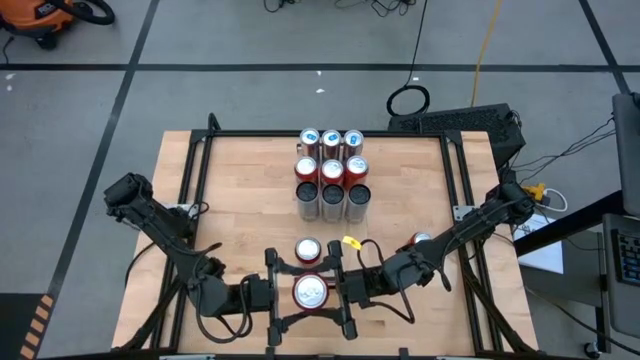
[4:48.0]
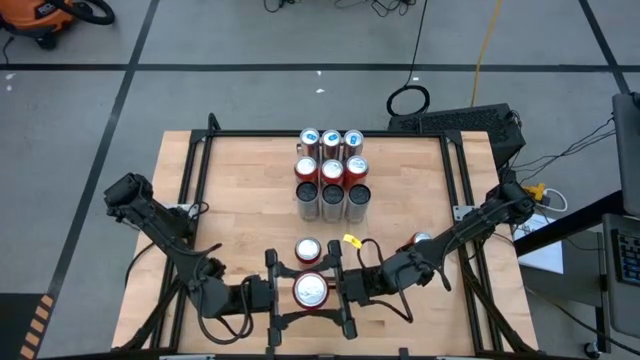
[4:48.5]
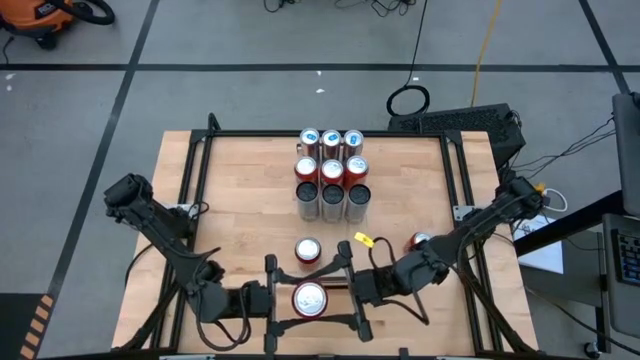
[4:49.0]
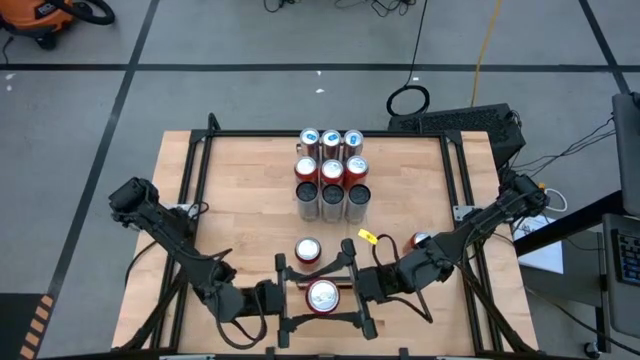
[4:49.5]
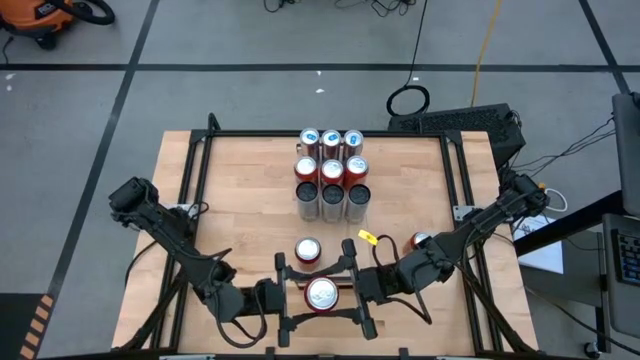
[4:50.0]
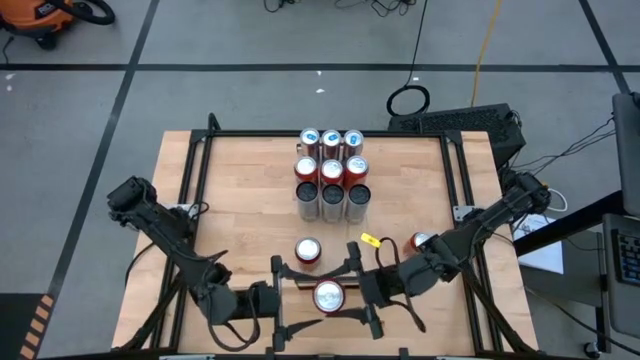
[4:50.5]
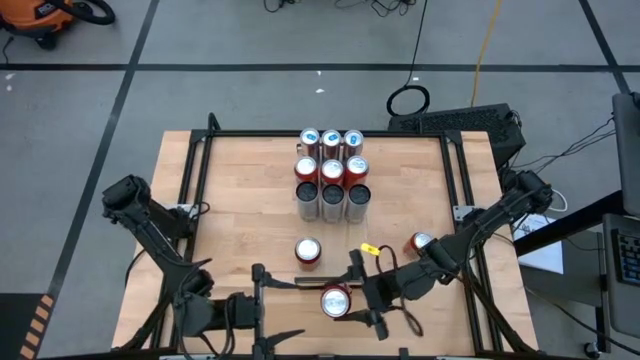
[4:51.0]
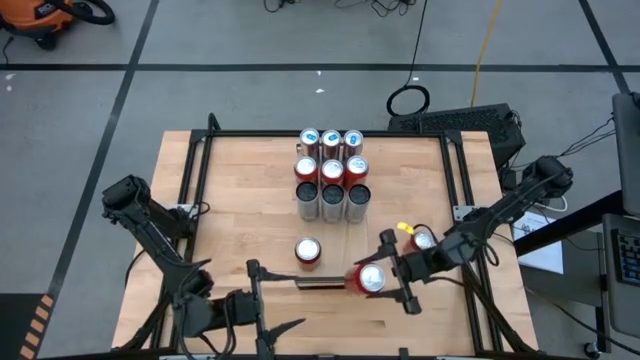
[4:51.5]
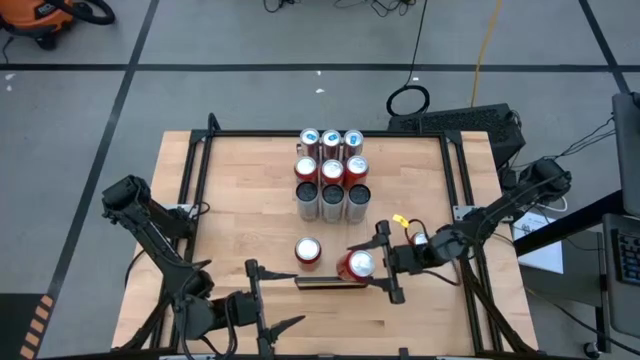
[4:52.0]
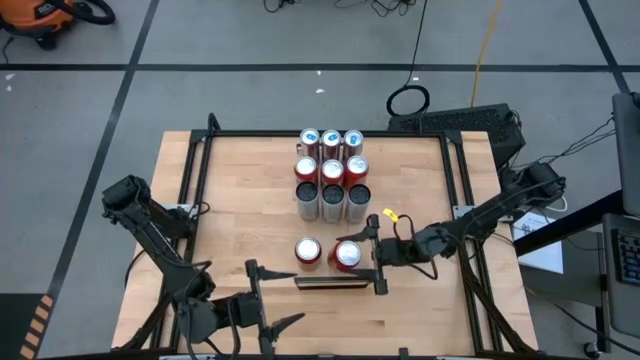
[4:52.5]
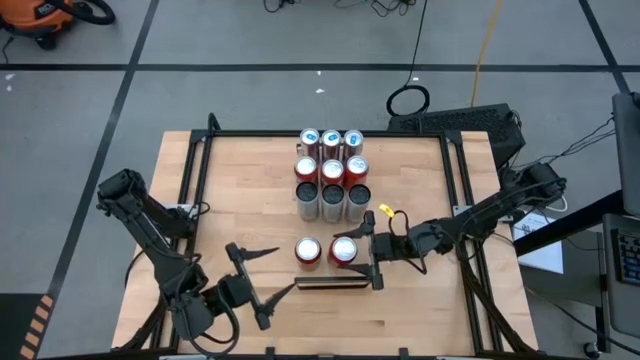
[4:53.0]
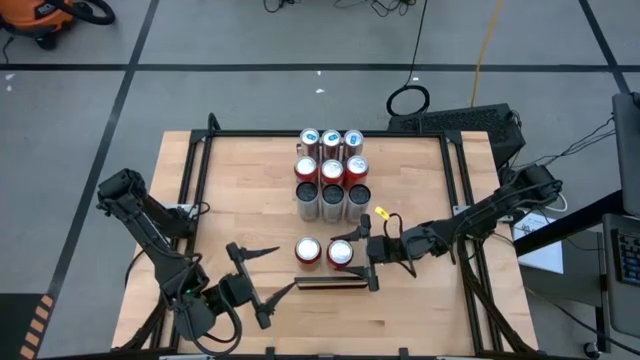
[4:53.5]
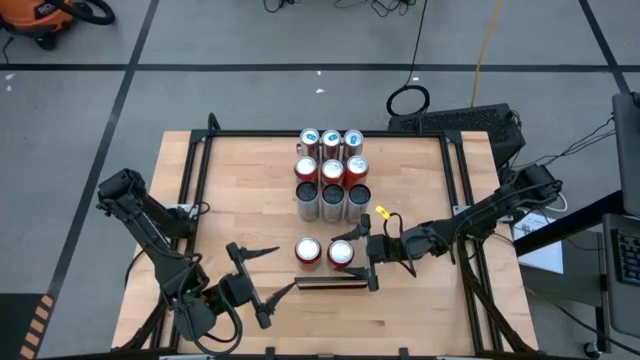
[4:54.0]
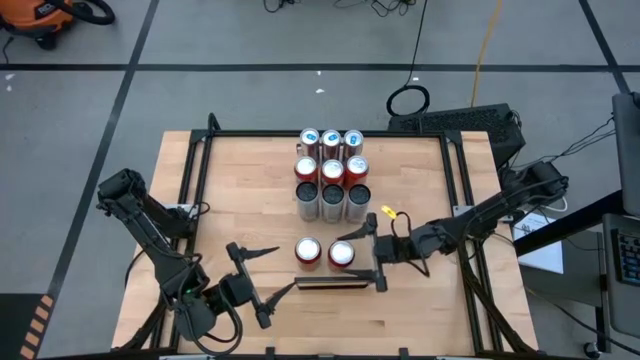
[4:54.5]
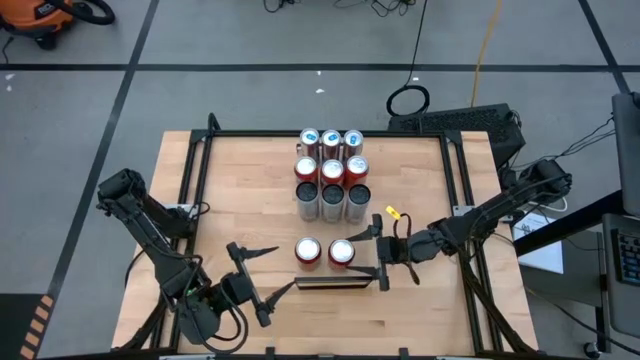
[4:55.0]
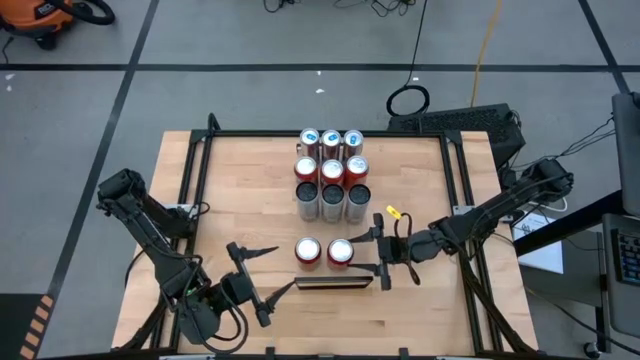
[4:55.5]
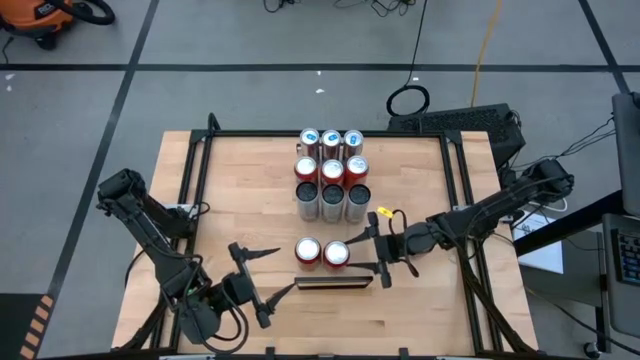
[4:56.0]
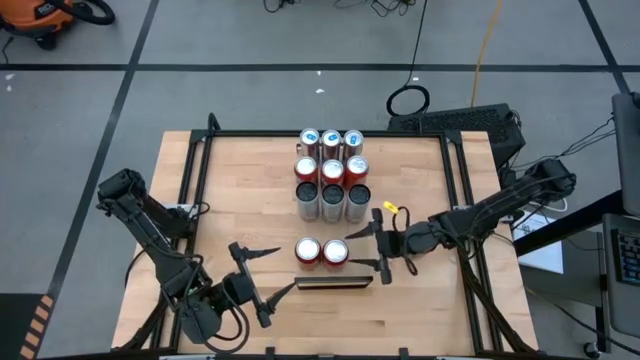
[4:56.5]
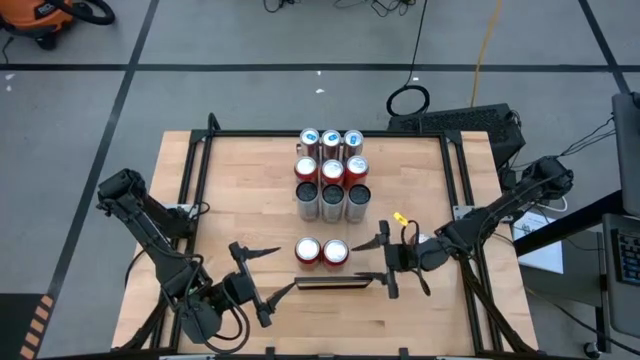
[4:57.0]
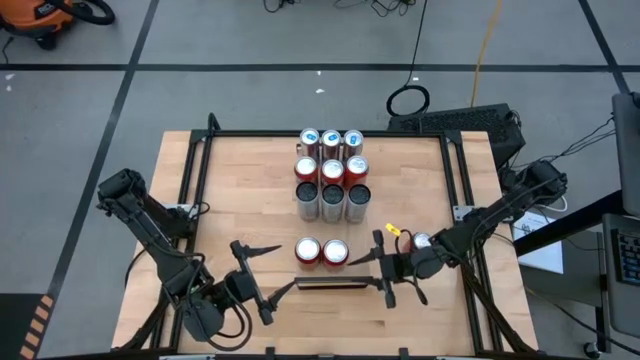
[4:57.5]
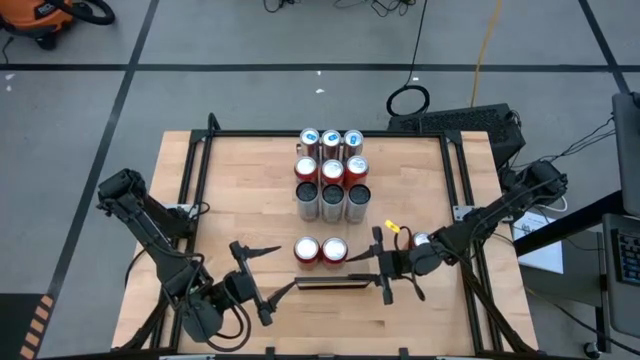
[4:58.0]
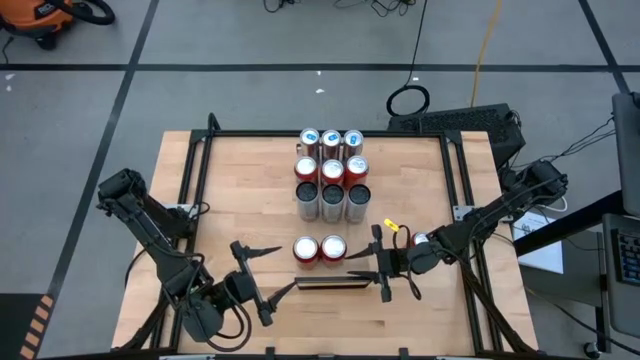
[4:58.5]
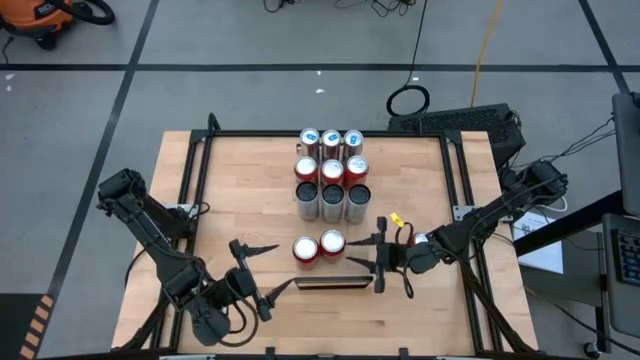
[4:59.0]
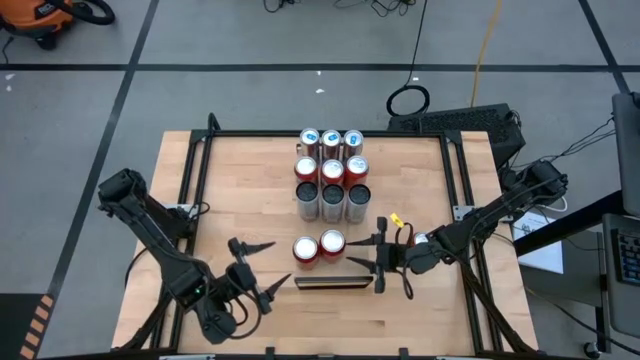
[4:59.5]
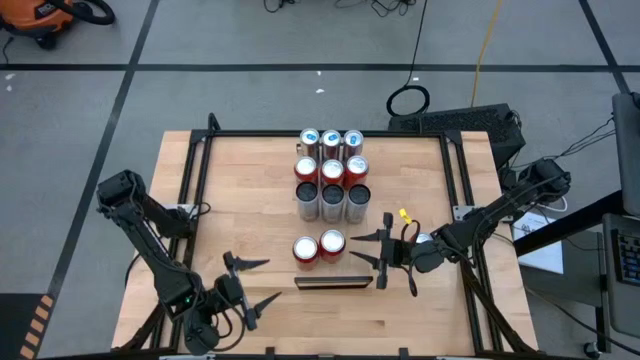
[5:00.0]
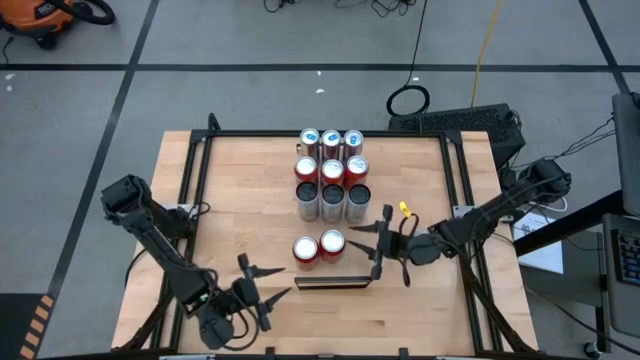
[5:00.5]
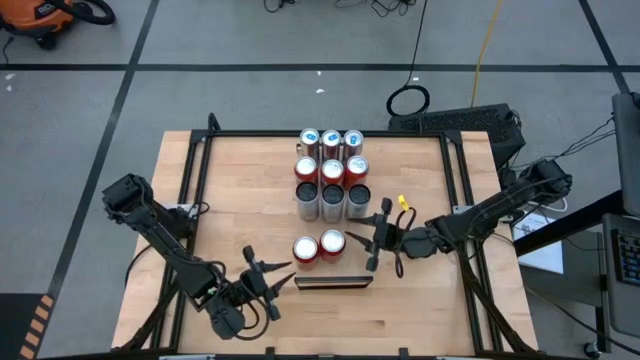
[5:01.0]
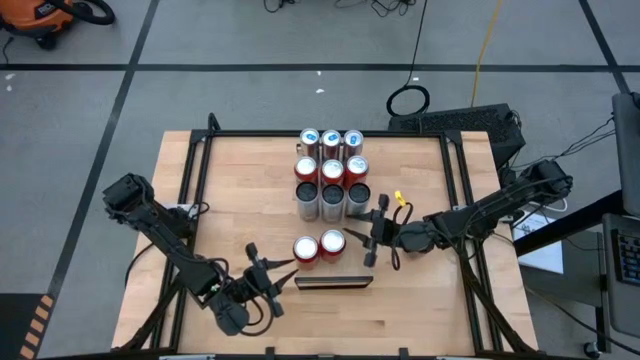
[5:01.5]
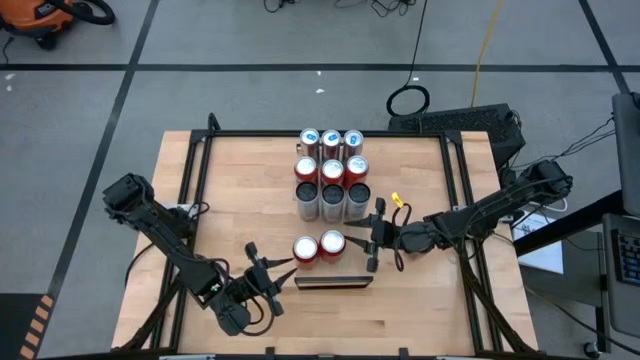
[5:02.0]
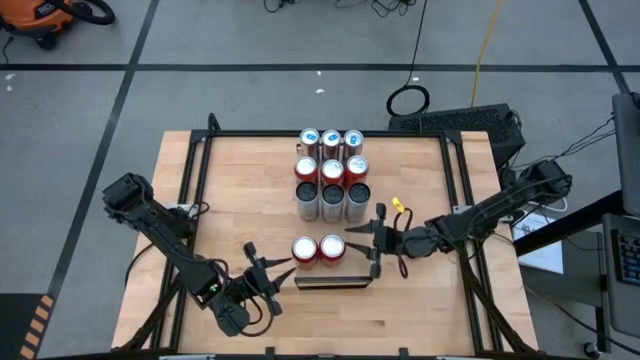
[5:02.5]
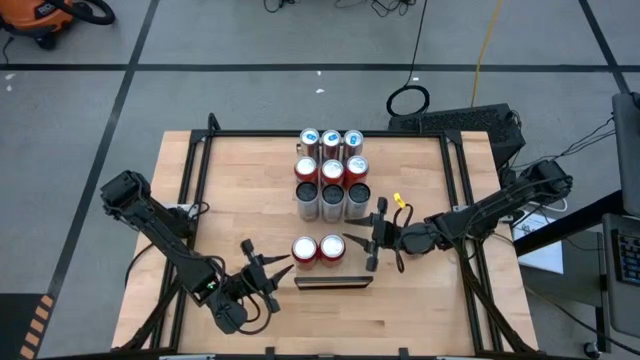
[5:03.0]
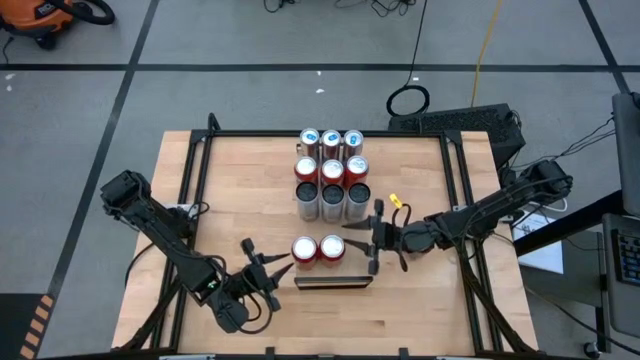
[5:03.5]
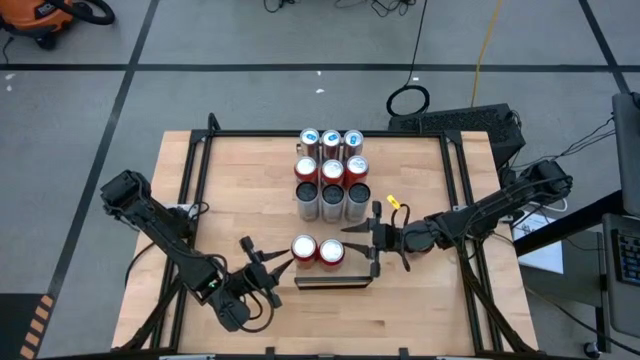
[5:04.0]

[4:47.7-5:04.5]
Task: Place canned beverage on shelf
Put the left red black soda can on the shelf aligned with the other red black soda can

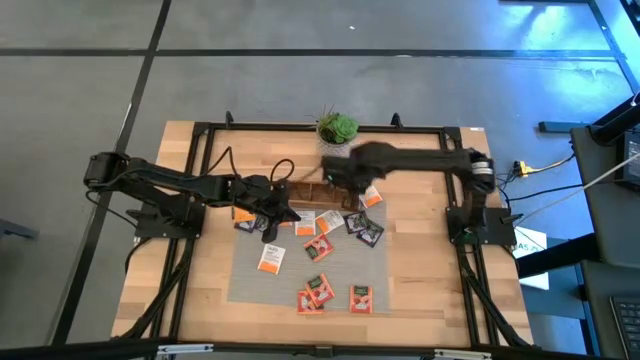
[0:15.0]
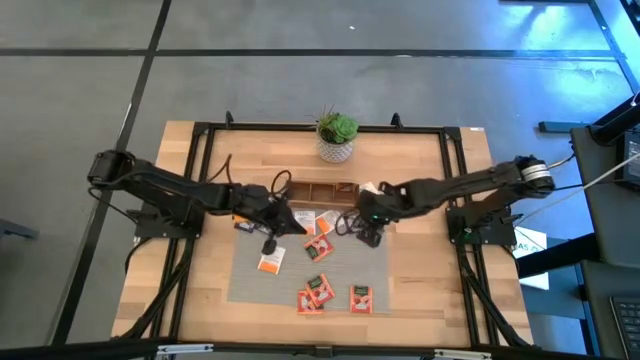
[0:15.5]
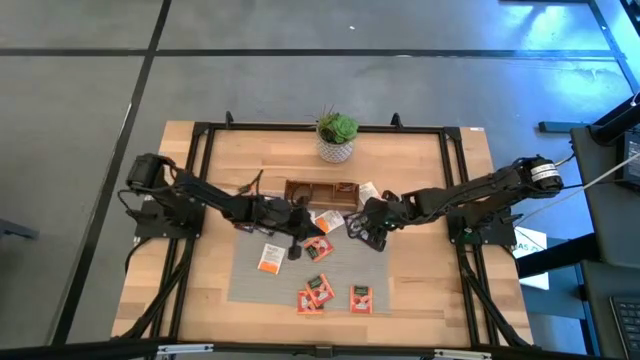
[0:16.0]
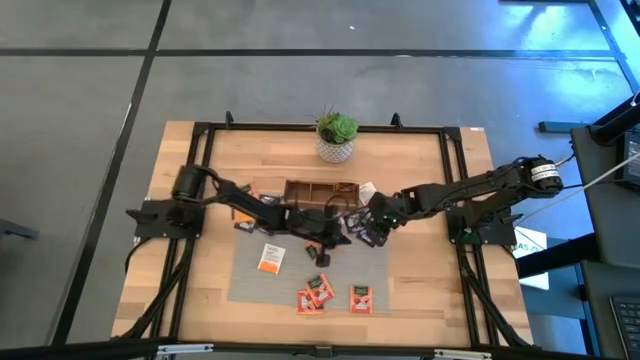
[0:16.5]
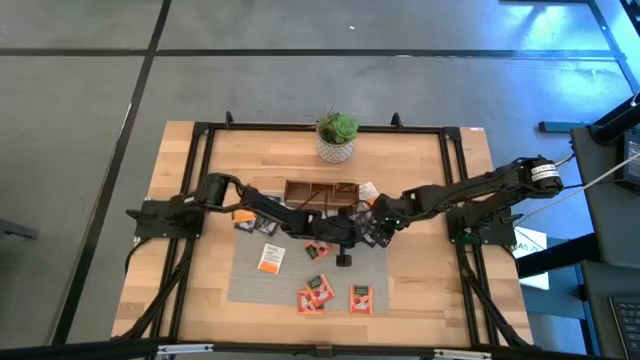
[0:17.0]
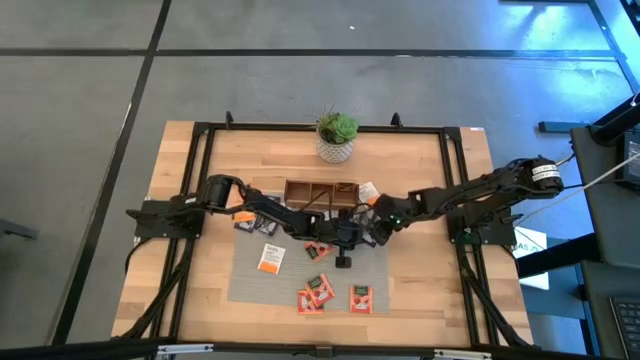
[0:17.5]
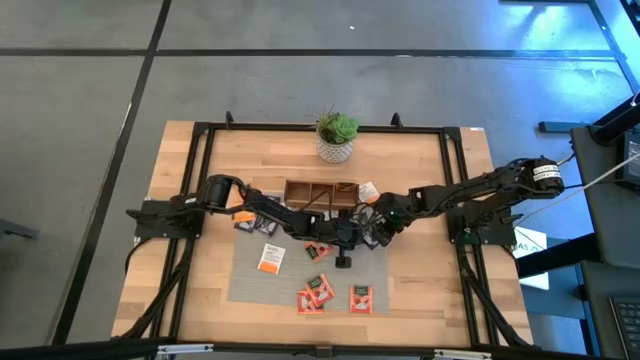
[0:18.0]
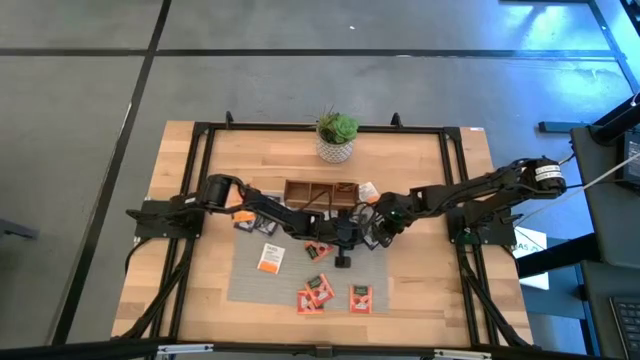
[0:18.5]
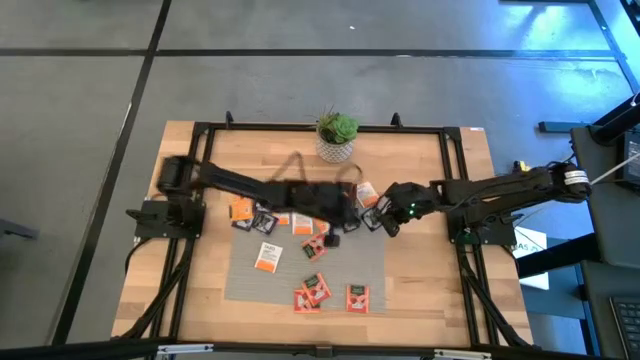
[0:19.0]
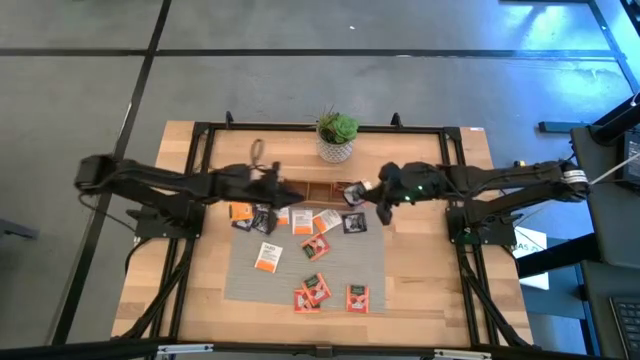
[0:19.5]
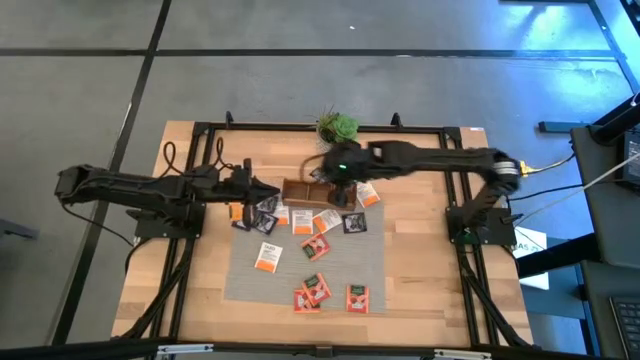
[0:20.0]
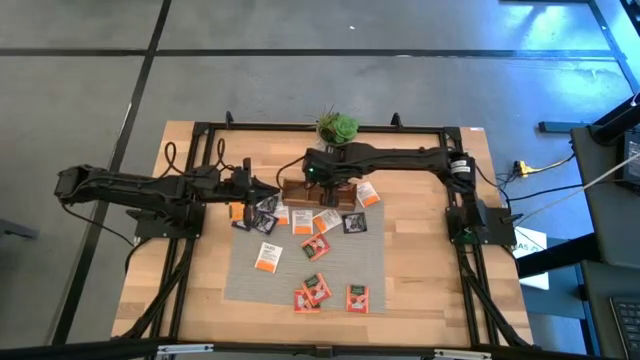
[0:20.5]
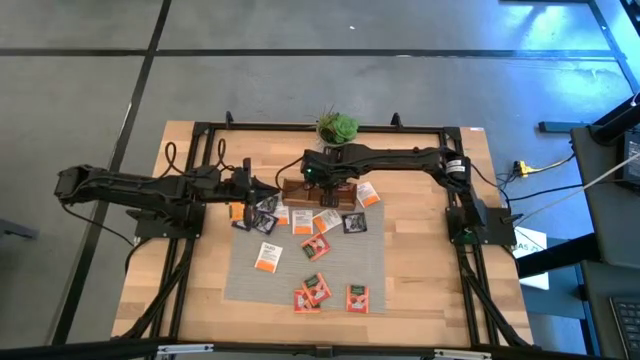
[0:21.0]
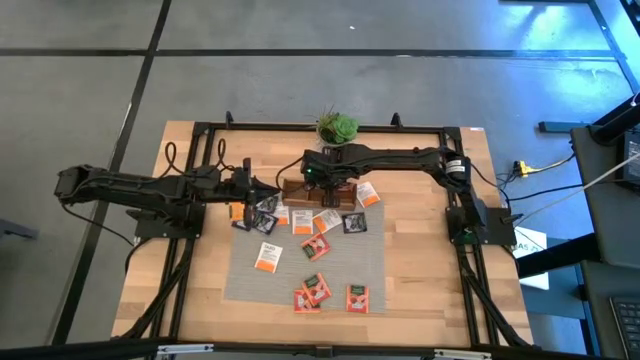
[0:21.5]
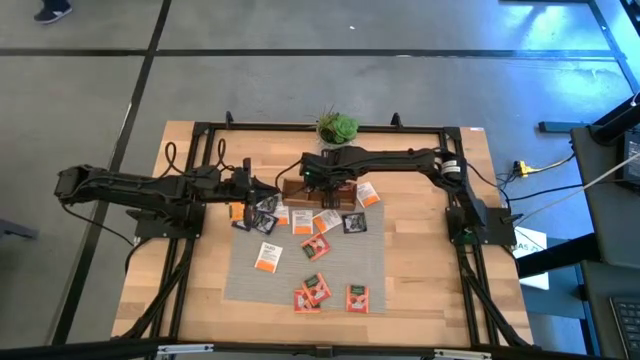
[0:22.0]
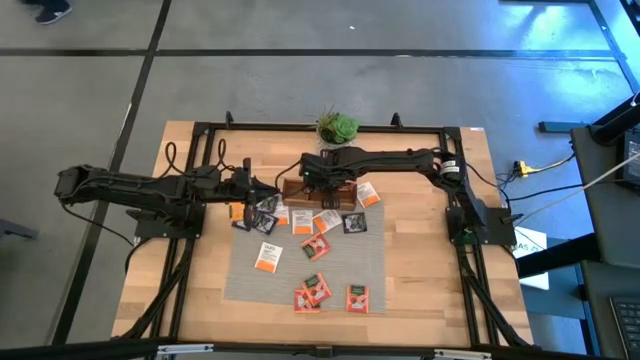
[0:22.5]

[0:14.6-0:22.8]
Task: Pick & Place Tea
Put the dark blue tea bag into the middle section of the wooden organizer
